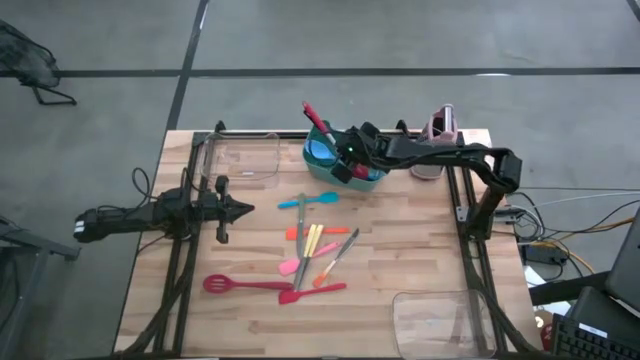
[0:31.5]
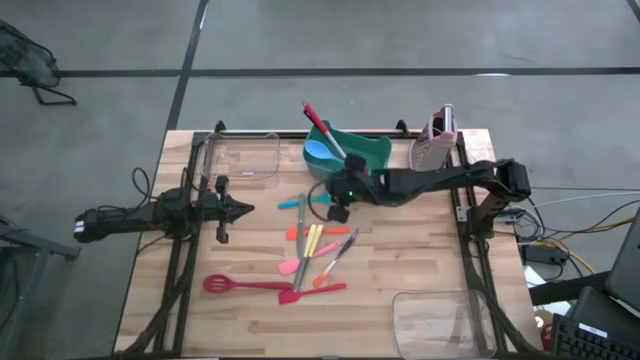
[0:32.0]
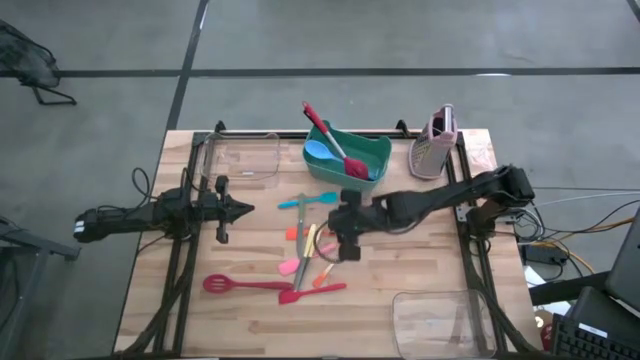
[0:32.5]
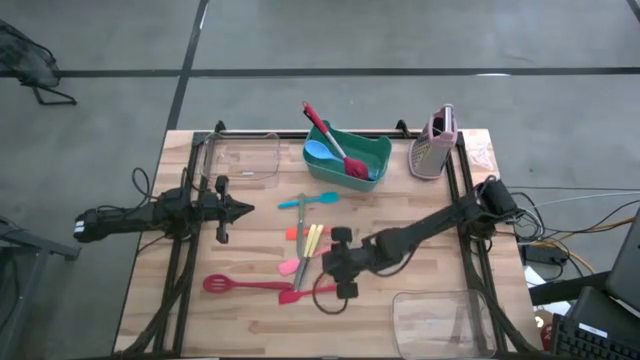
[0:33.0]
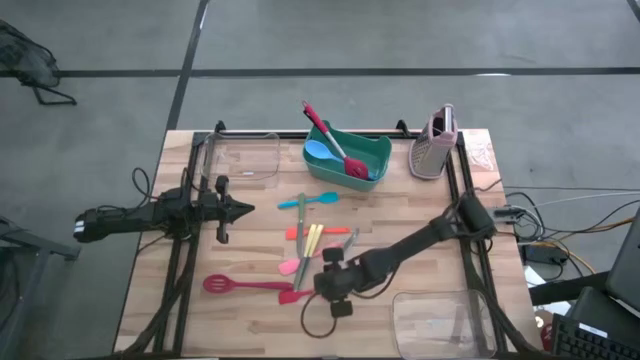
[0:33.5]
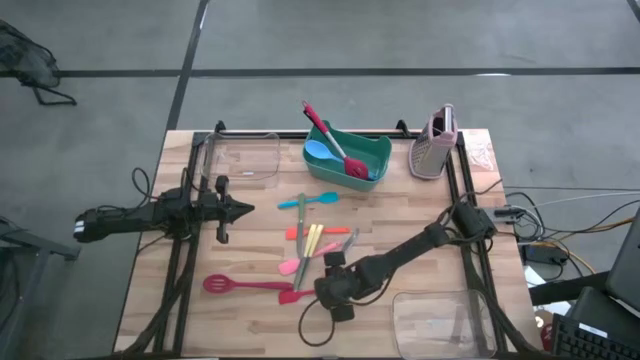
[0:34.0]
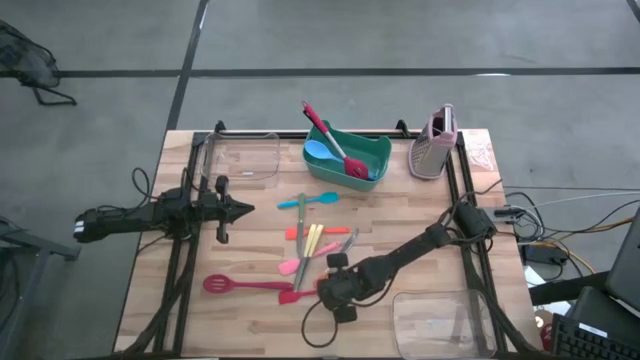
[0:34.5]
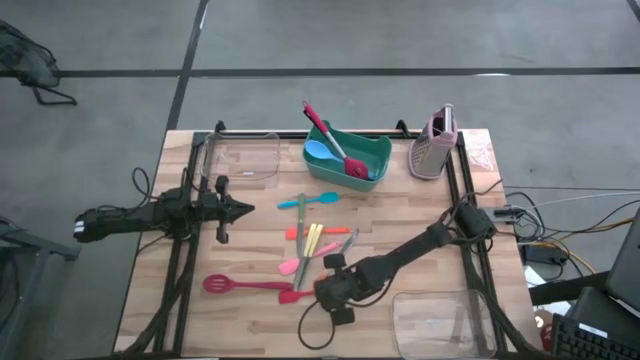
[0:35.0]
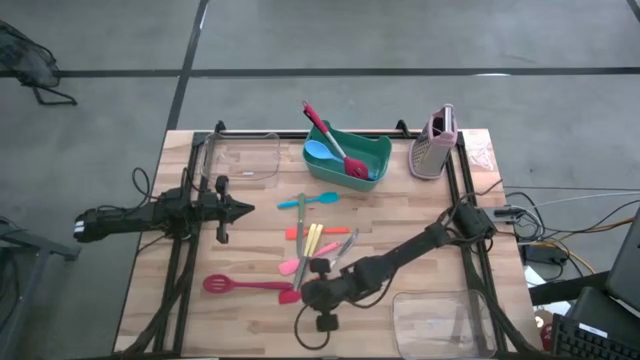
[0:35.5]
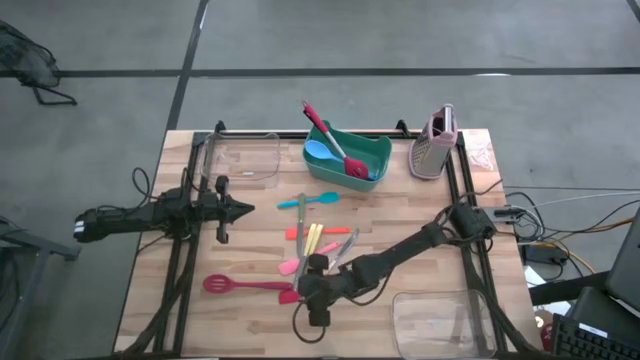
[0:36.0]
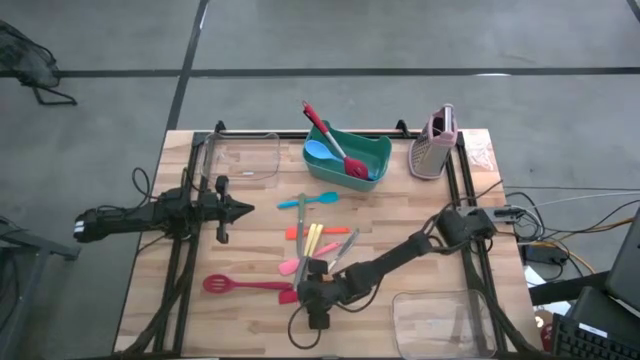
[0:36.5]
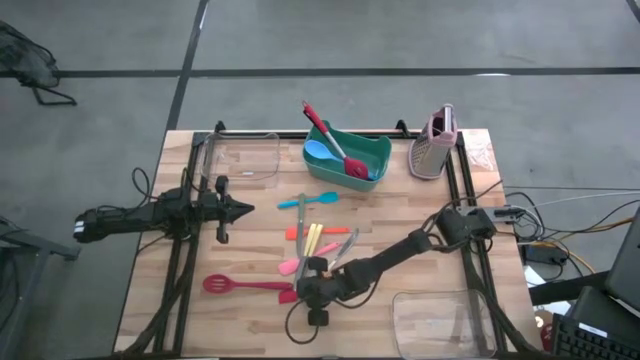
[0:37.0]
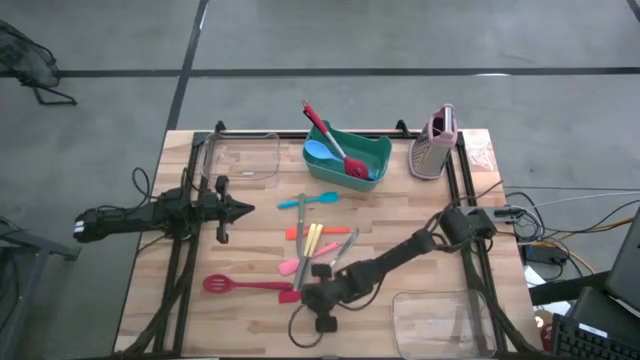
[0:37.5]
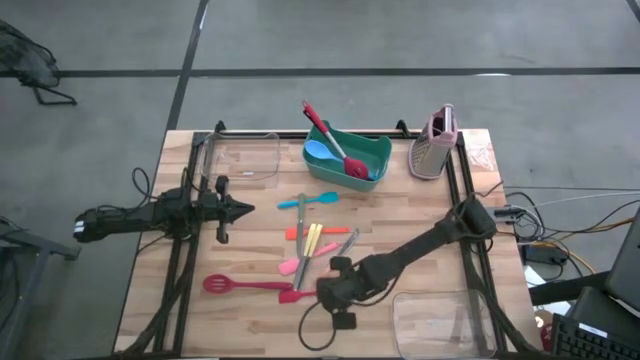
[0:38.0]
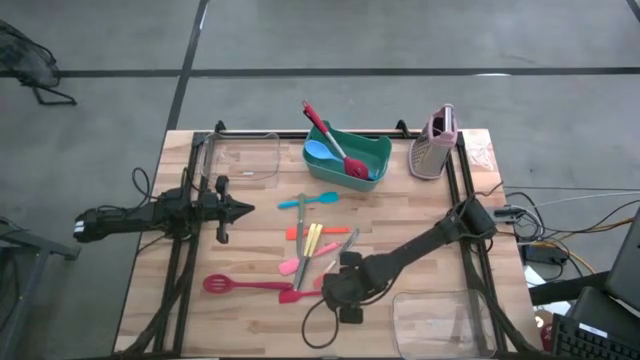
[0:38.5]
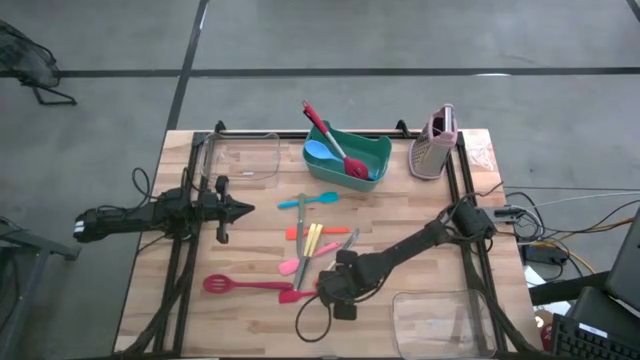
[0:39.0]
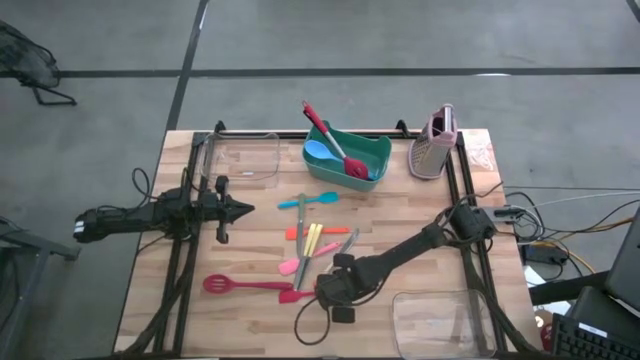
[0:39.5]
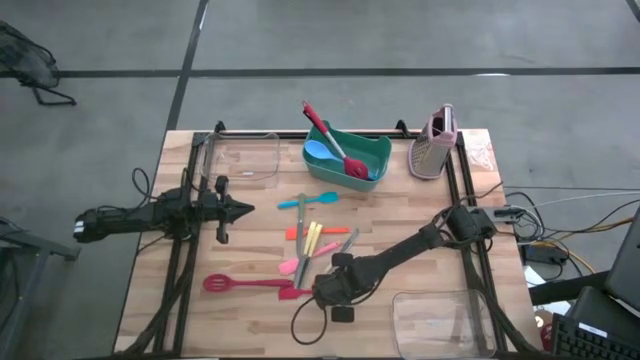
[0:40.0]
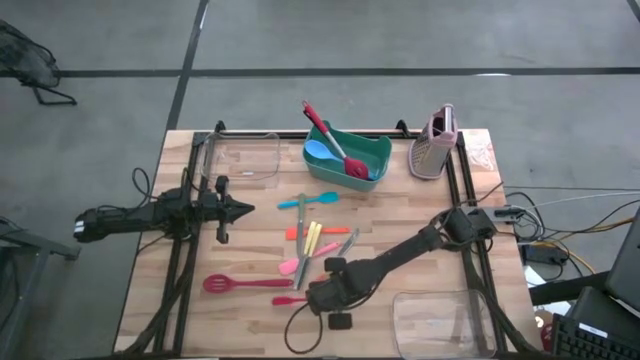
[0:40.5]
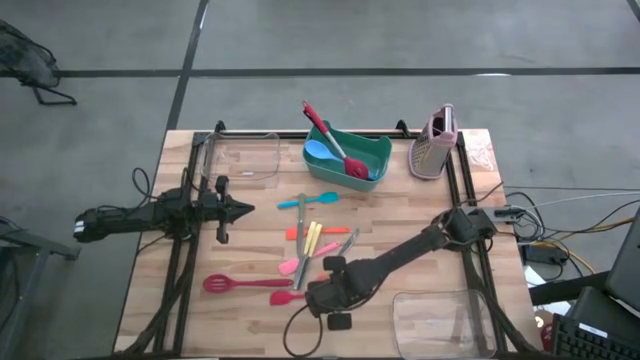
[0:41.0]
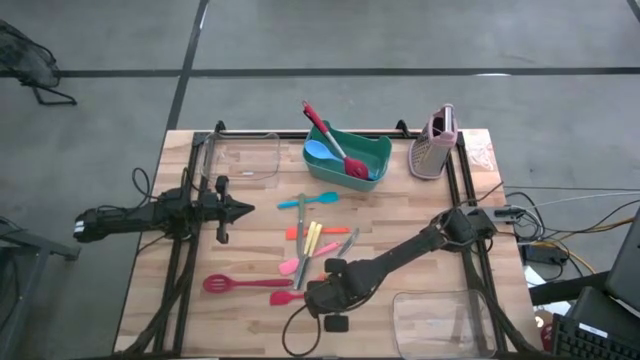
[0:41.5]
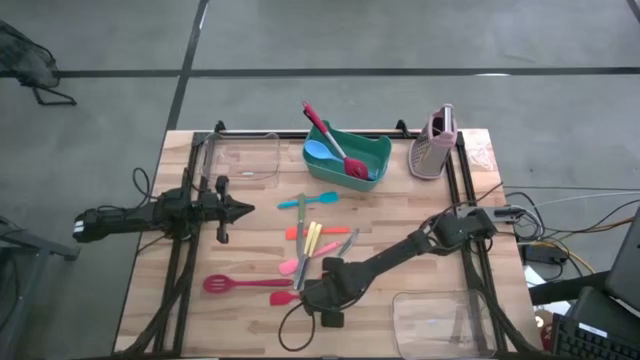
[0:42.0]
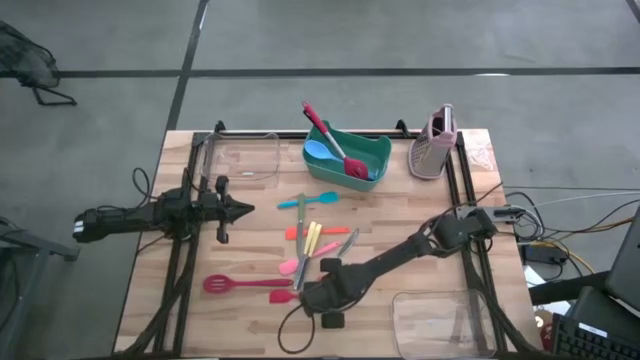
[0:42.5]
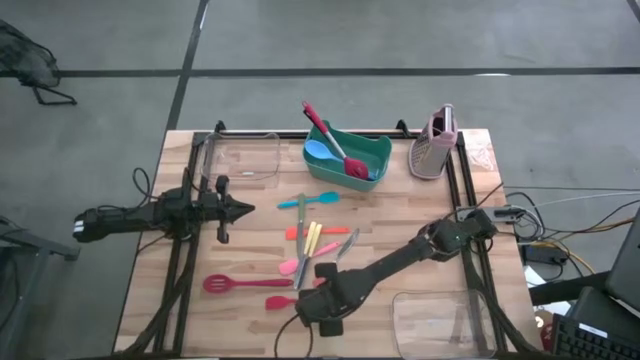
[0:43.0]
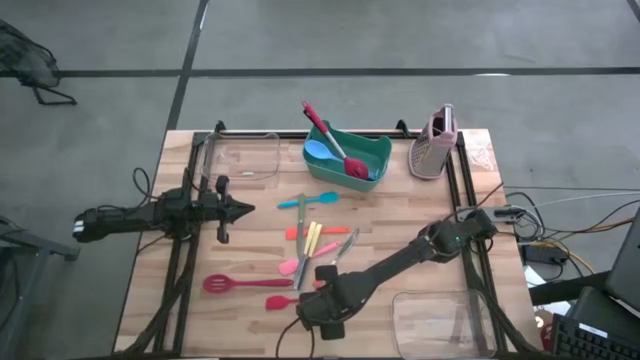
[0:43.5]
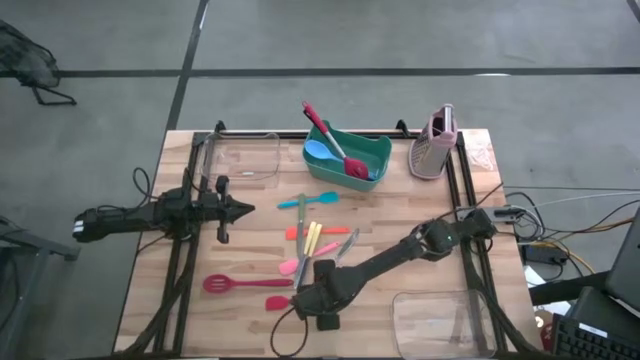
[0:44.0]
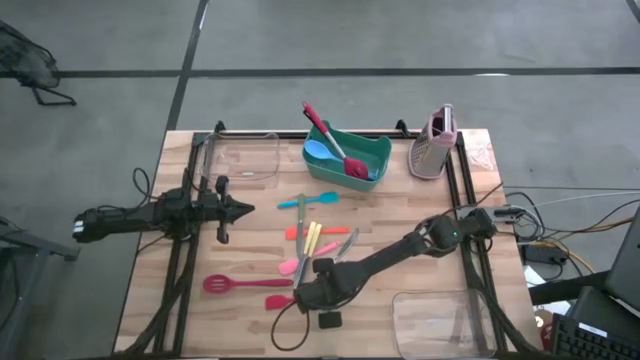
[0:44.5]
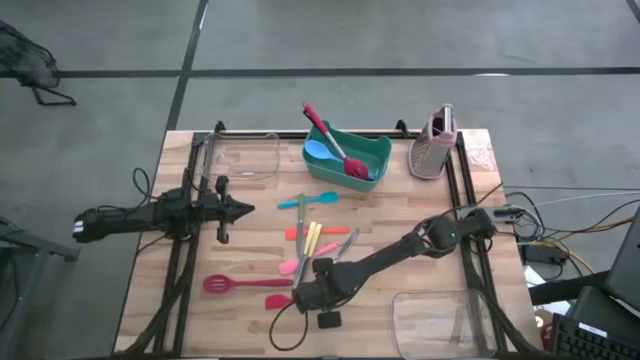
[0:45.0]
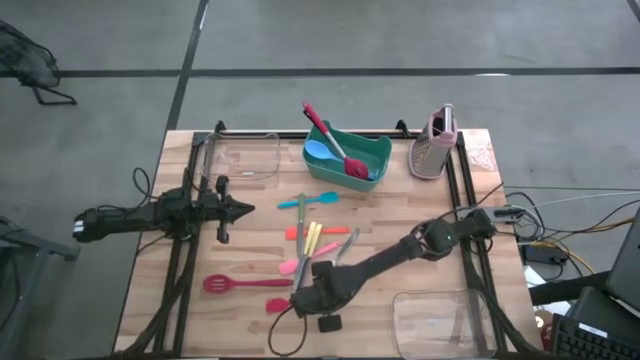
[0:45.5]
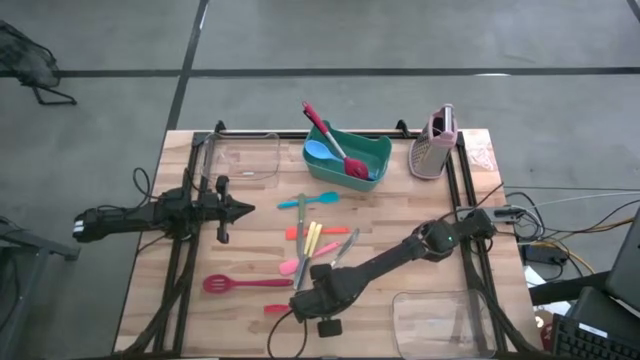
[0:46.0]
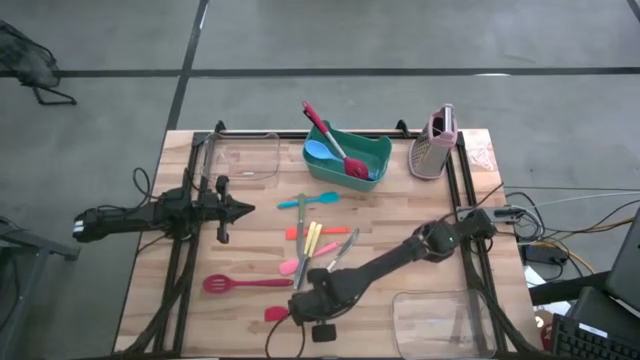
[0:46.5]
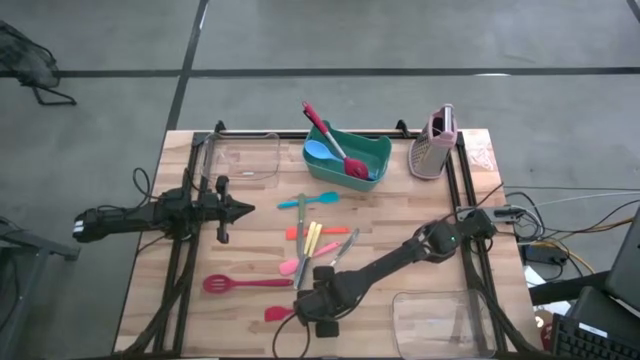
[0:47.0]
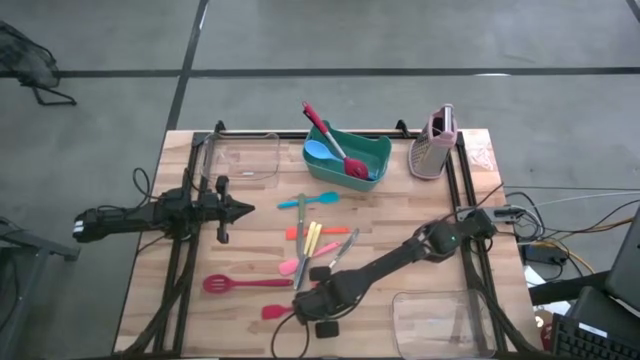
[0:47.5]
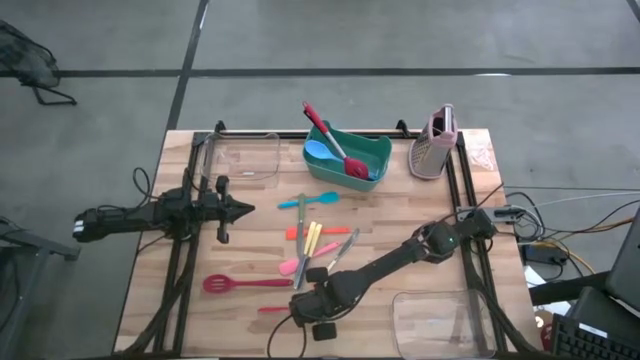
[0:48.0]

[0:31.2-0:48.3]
Task: Pick & Place Kitchen Items
Put the red spatula into the bottom transparent bin

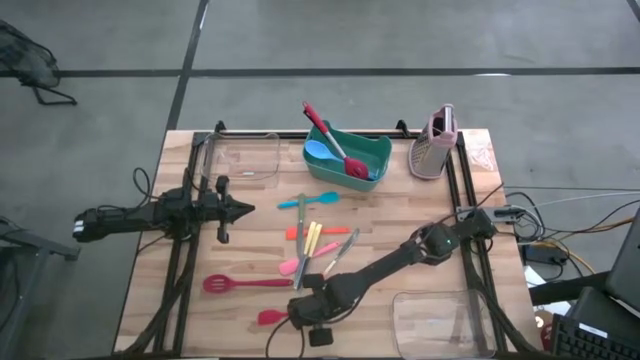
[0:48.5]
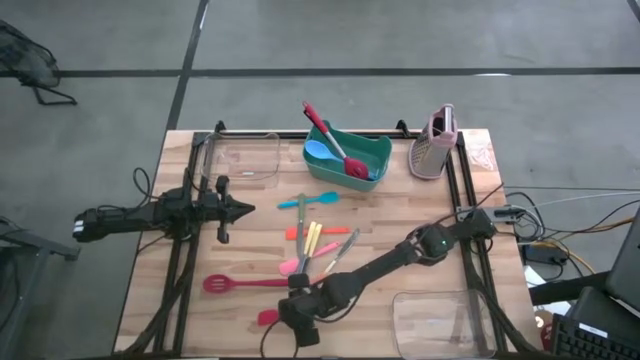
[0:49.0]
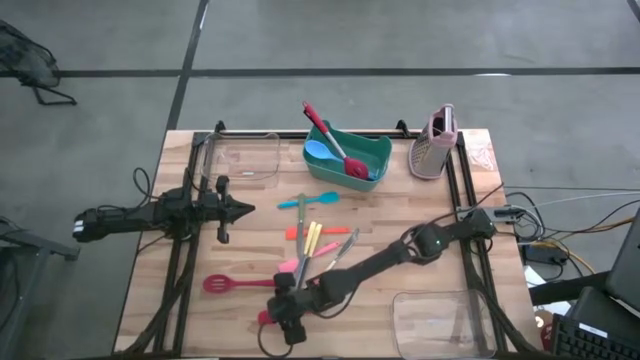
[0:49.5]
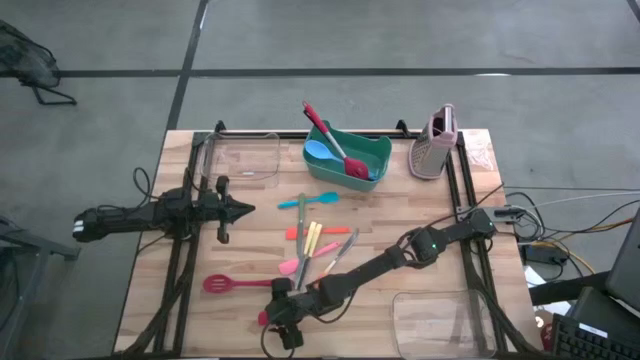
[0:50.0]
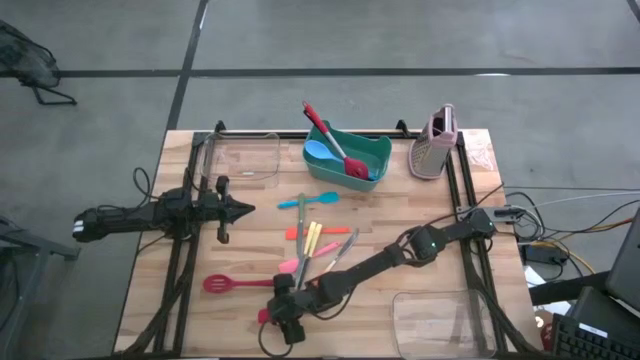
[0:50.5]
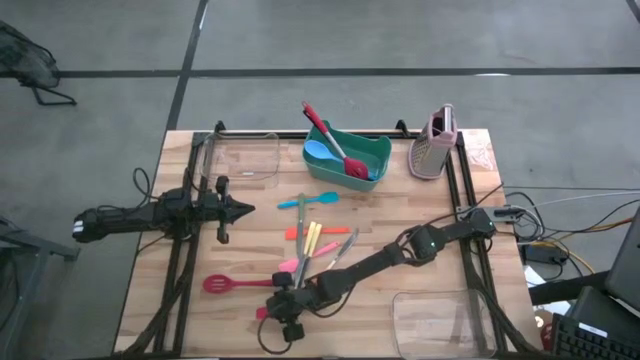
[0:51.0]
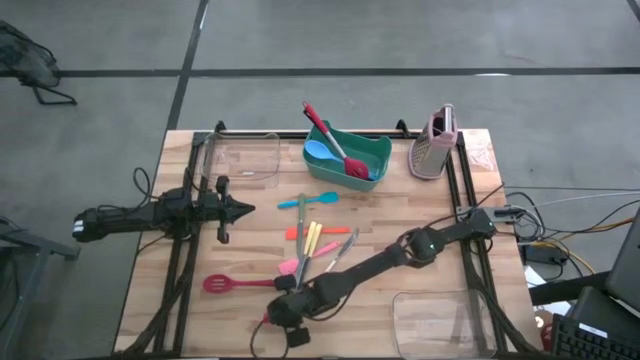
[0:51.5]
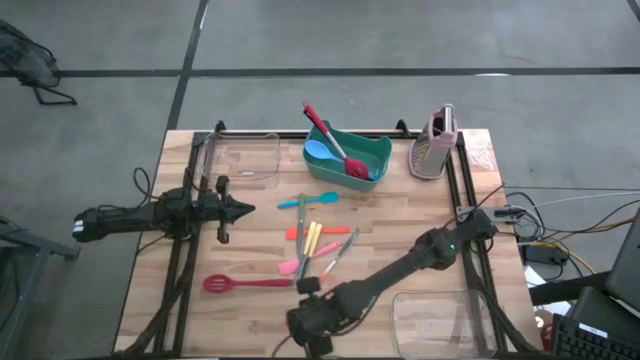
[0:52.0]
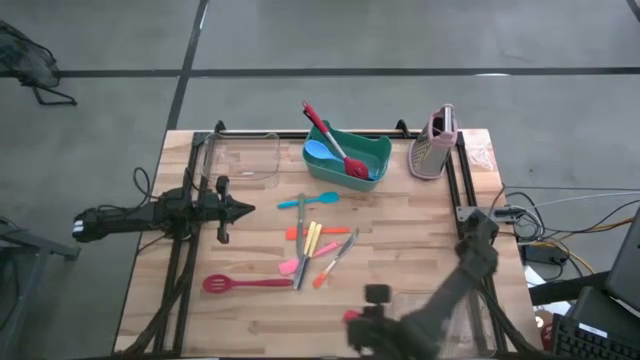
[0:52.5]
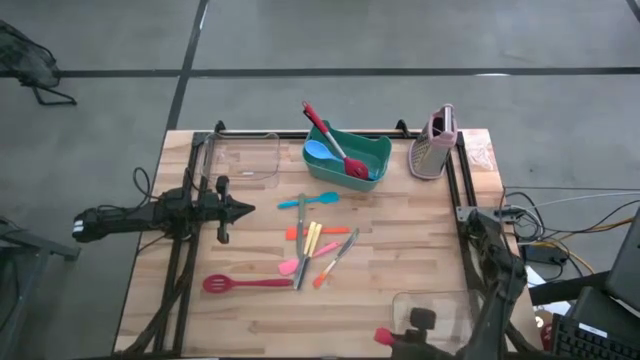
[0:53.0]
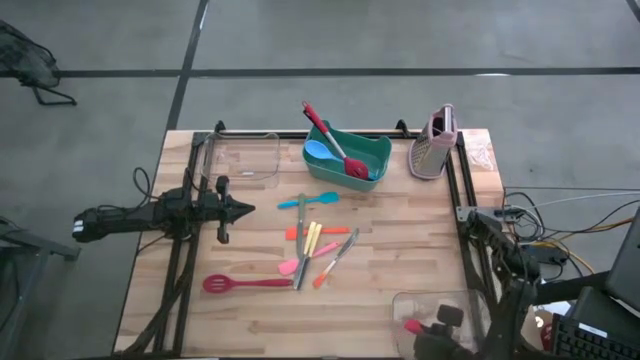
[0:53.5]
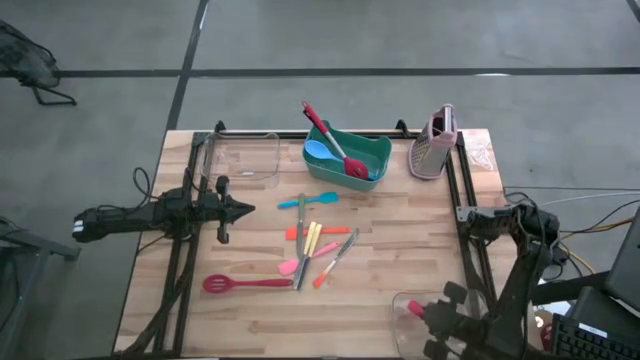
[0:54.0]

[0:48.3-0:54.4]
Put the red spatula into the bottom transparent bin
